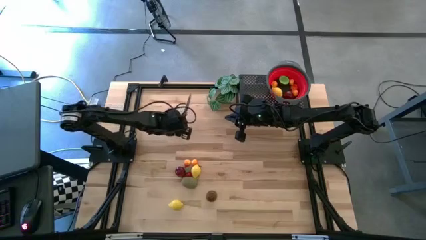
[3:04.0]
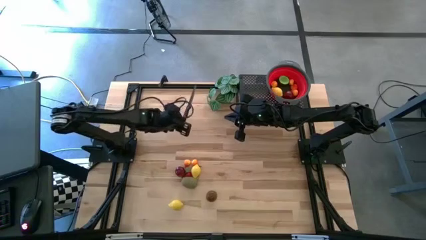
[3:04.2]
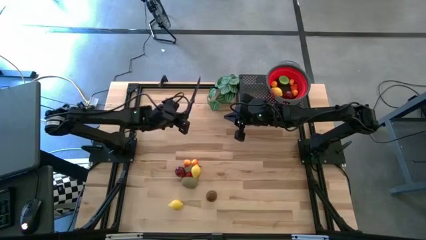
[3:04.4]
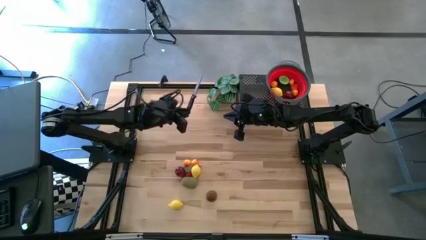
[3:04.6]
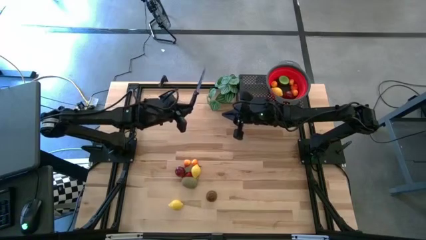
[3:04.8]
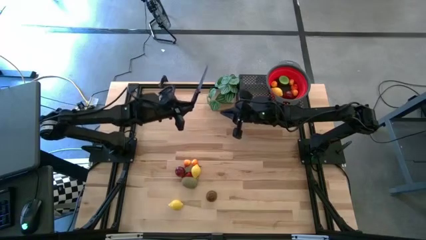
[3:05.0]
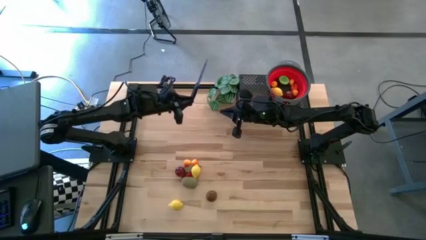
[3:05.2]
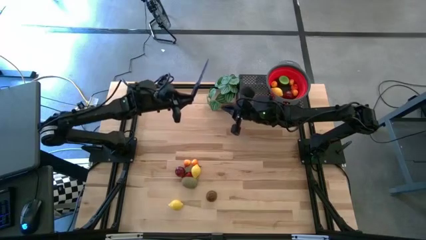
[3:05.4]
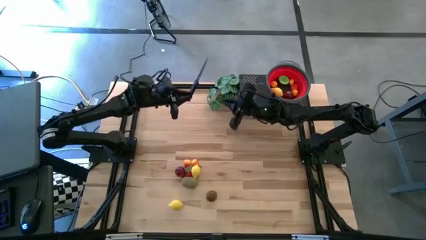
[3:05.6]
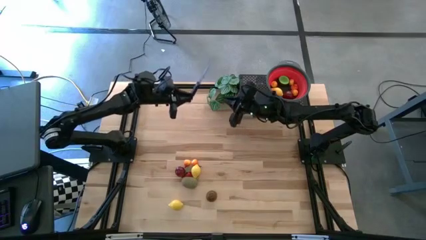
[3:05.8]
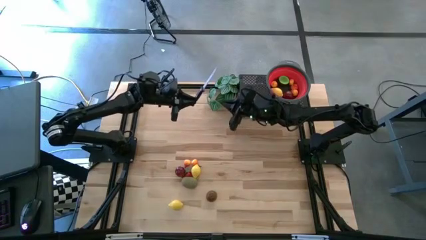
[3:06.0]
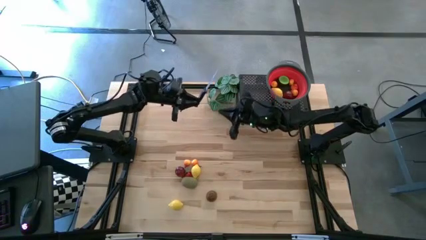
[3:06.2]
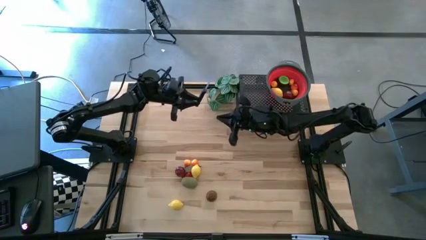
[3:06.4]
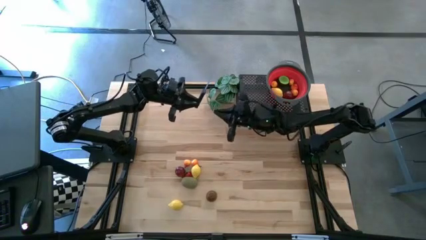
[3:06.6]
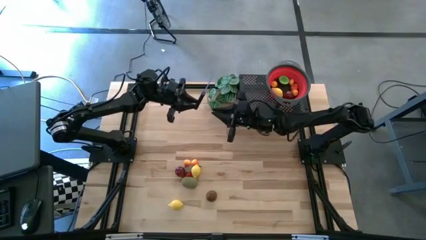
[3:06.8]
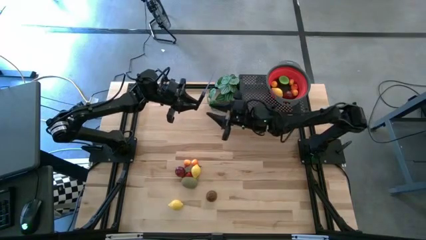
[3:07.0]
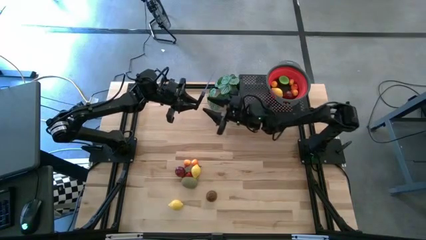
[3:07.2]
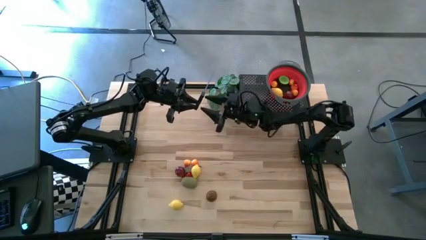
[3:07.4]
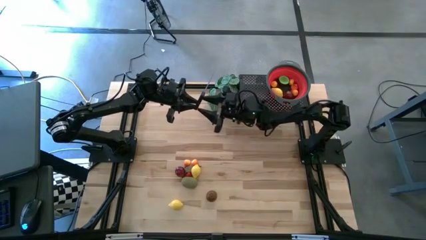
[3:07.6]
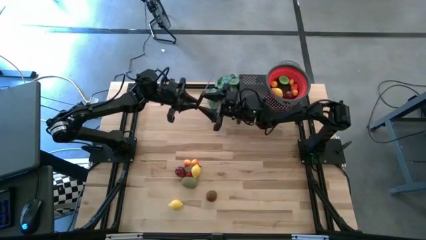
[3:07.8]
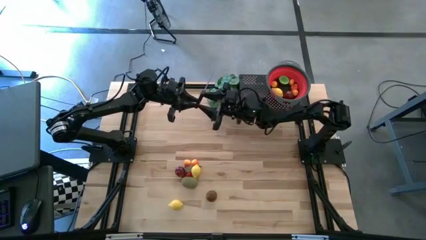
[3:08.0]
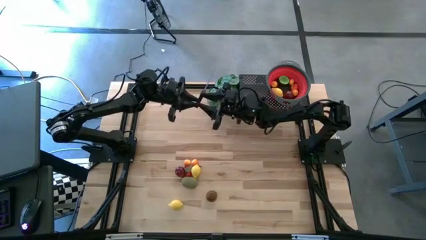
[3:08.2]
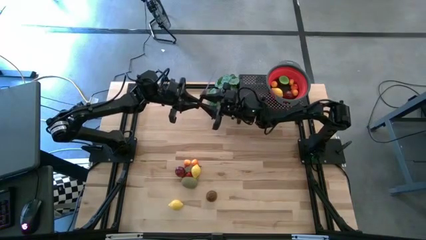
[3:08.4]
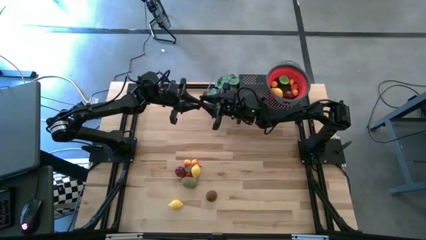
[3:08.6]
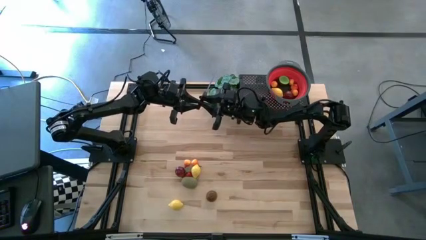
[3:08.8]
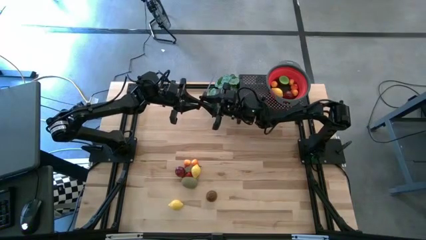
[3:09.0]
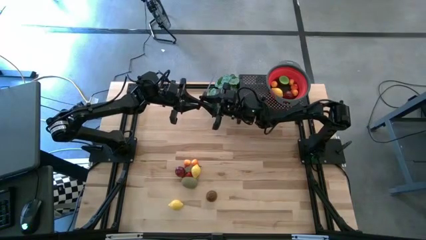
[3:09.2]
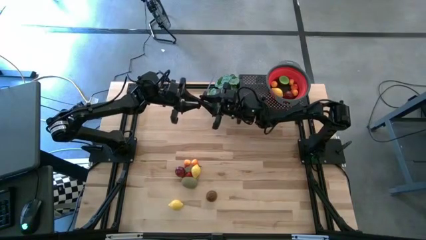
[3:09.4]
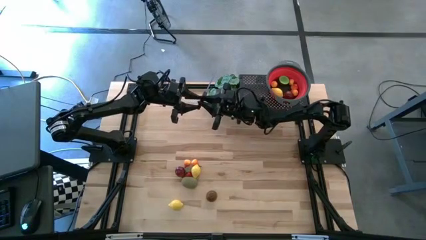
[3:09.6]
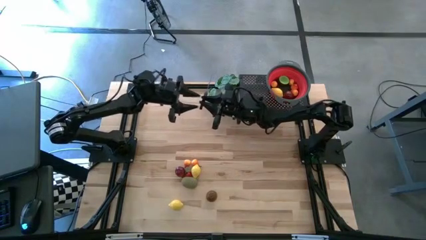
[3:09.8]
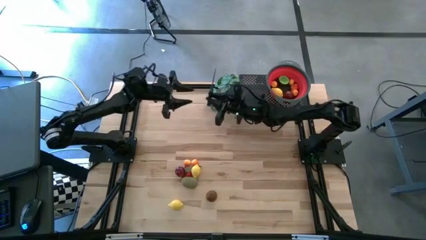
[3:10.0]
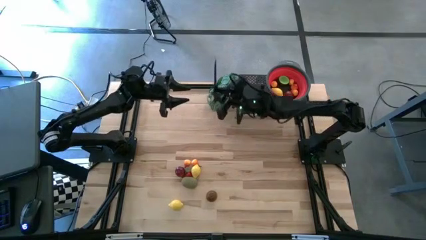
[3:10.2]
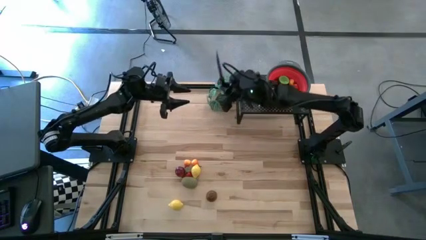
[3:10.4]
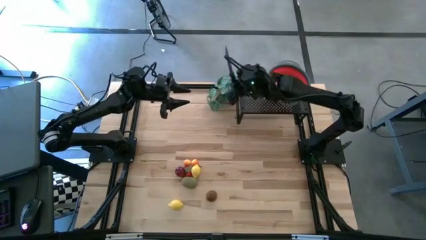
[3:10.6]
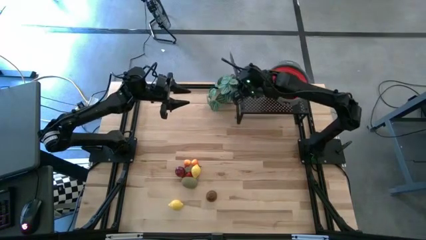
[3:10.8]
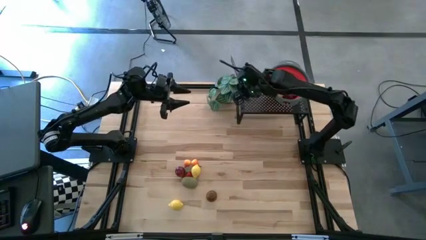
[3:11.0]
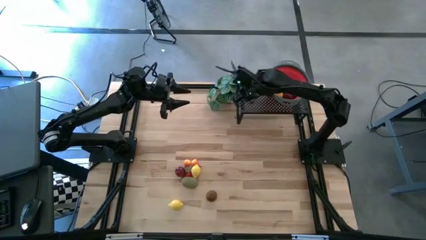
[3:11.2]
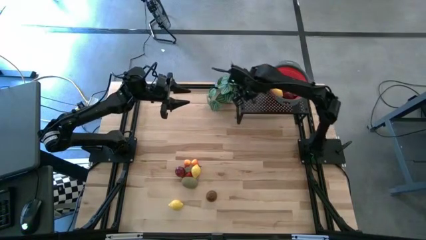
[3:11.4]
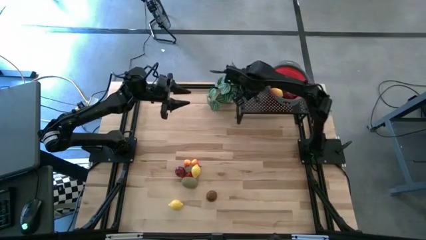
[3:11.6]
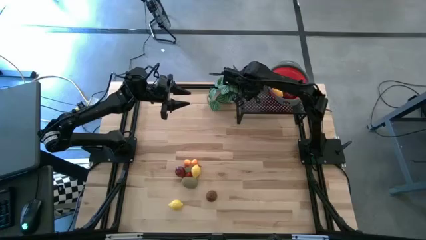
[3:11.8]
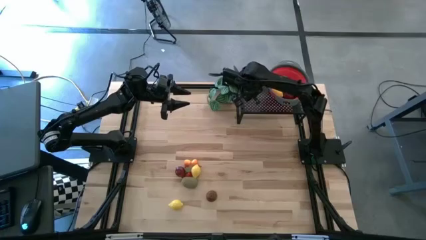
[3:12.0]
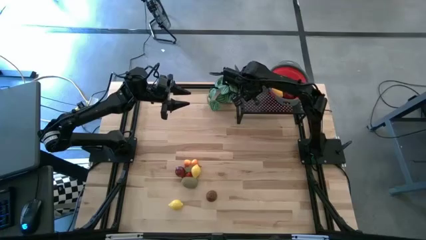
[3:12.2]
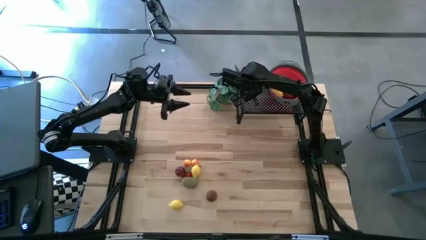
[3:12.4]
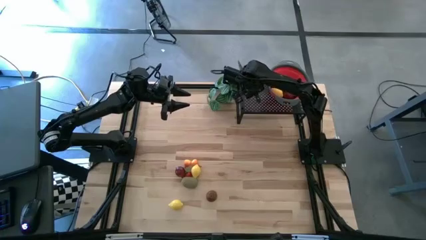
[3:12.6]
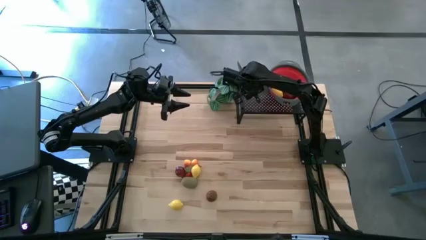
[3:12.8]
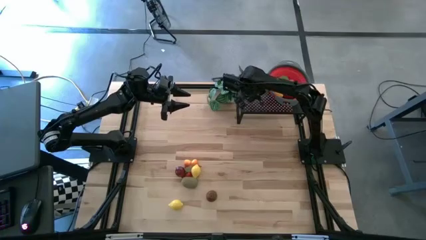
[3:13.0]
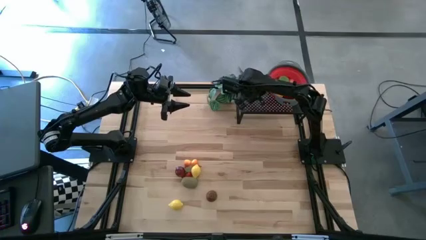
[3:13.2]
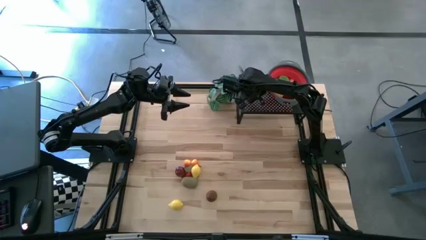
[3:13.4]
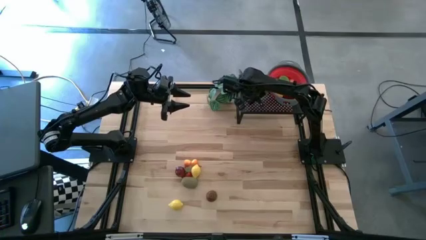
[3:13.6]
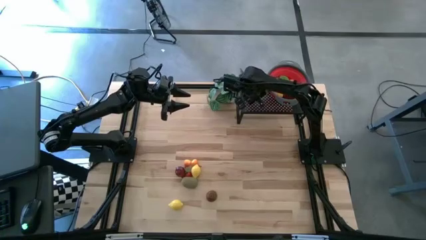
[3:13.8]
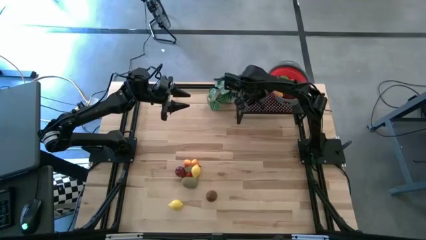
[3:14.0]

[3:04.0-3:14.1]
Task: Pick & Place Fruit
Put the black knife on the shelf

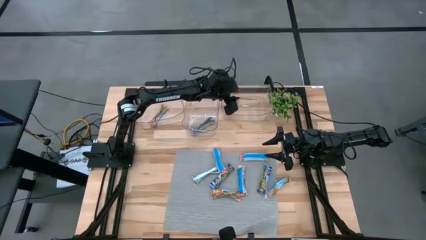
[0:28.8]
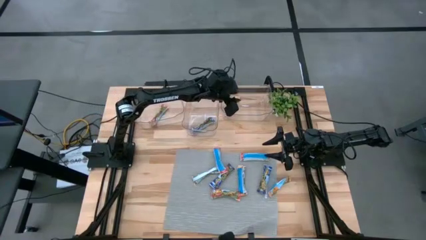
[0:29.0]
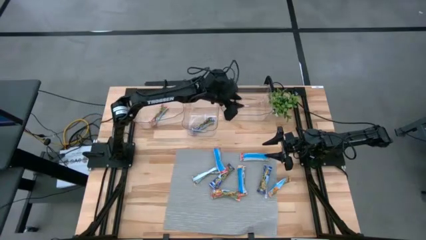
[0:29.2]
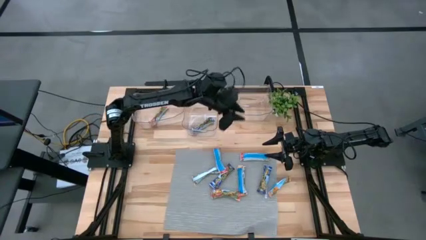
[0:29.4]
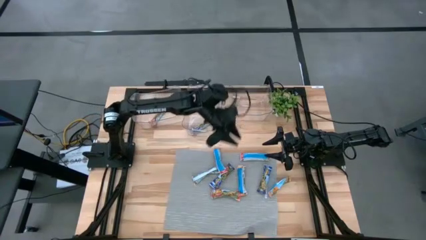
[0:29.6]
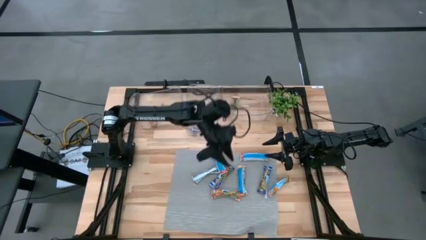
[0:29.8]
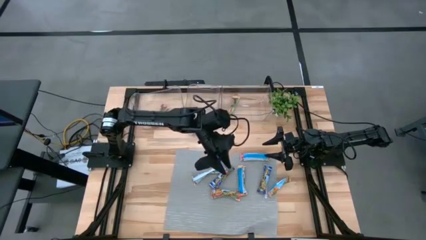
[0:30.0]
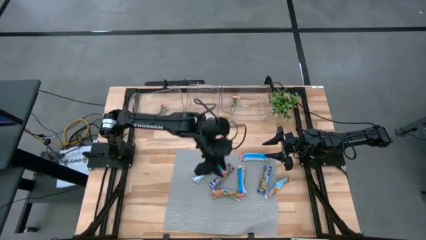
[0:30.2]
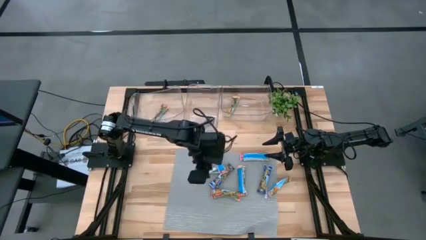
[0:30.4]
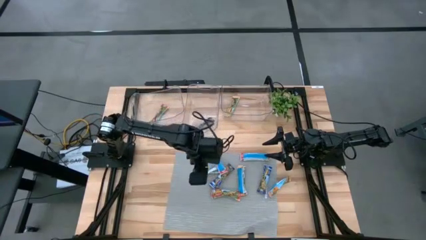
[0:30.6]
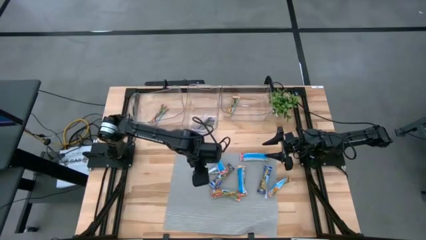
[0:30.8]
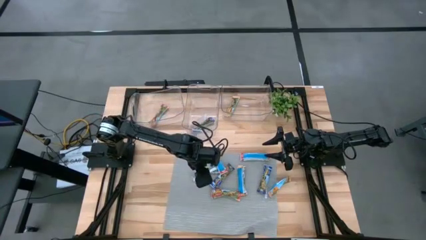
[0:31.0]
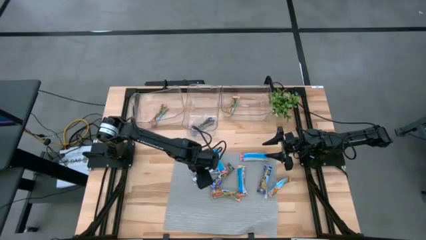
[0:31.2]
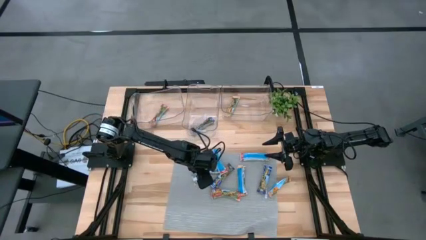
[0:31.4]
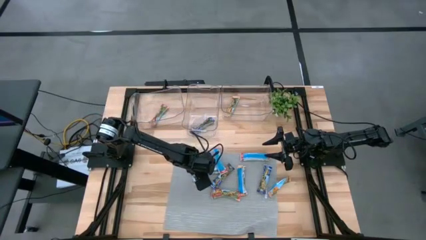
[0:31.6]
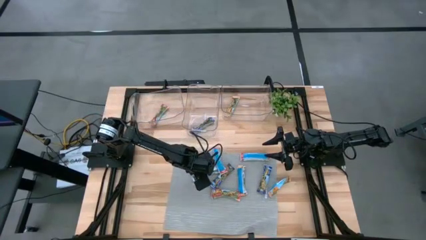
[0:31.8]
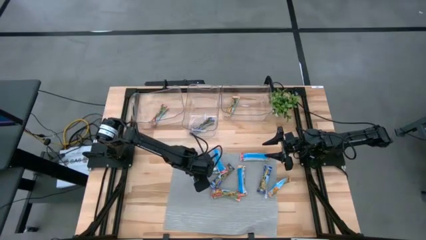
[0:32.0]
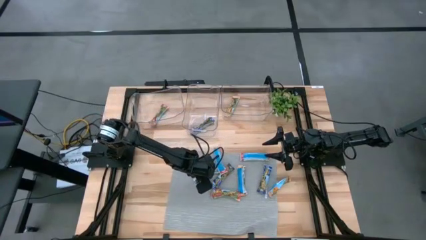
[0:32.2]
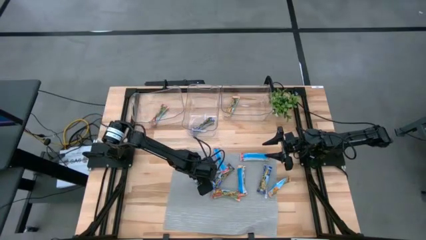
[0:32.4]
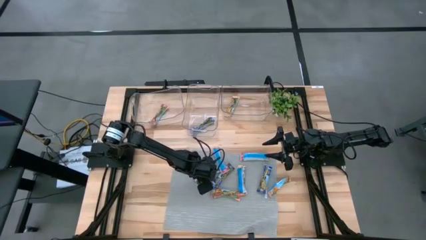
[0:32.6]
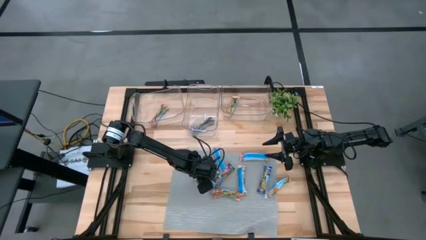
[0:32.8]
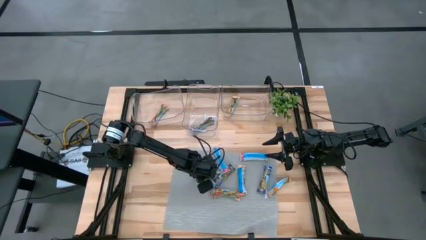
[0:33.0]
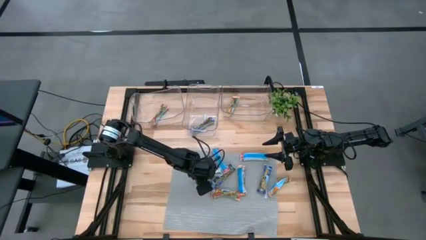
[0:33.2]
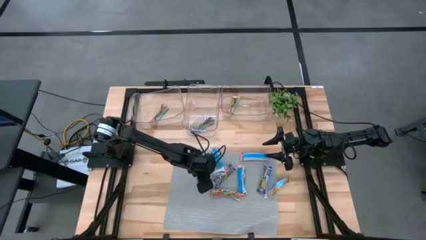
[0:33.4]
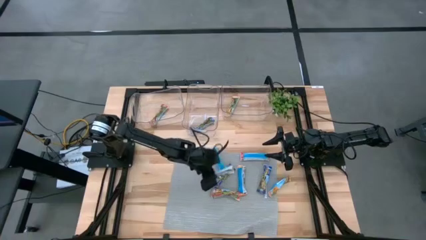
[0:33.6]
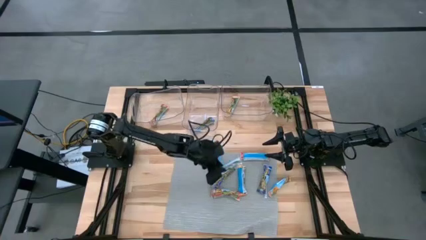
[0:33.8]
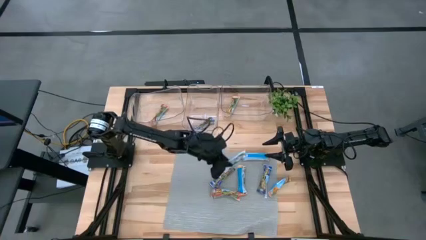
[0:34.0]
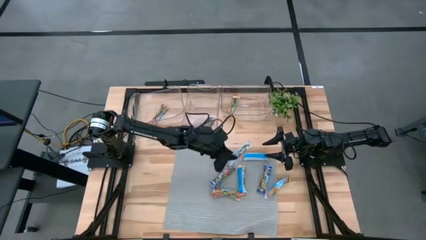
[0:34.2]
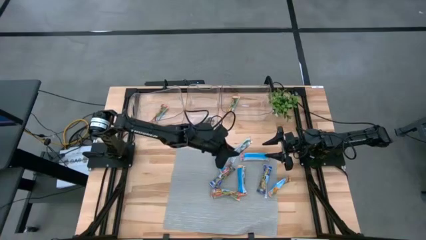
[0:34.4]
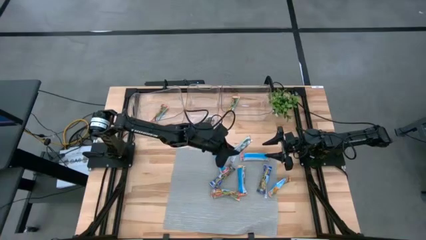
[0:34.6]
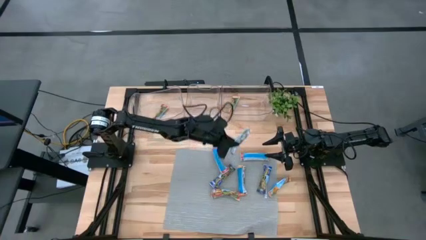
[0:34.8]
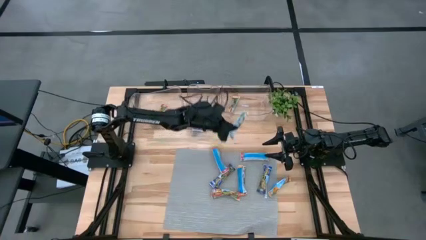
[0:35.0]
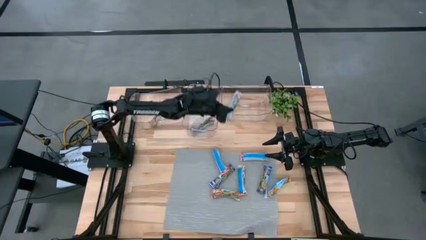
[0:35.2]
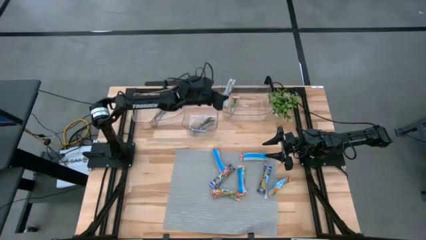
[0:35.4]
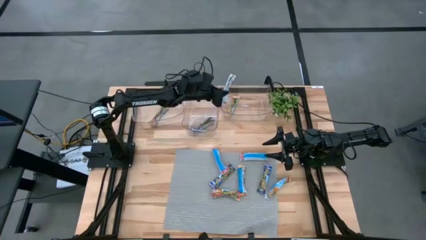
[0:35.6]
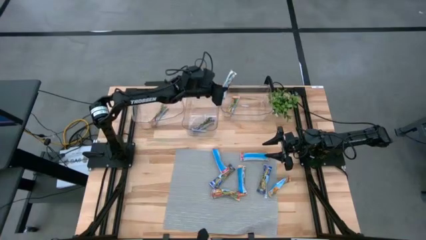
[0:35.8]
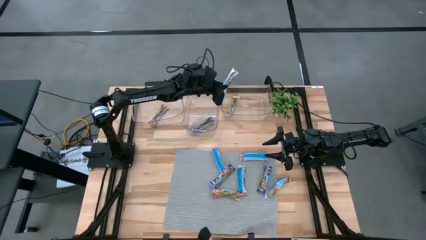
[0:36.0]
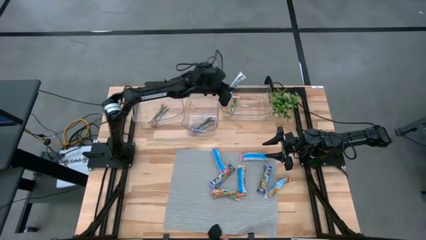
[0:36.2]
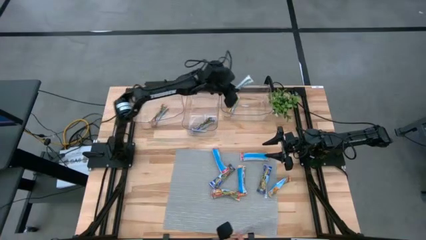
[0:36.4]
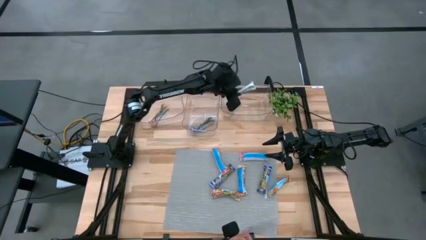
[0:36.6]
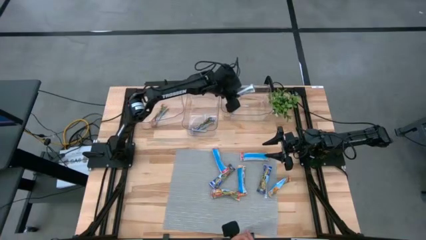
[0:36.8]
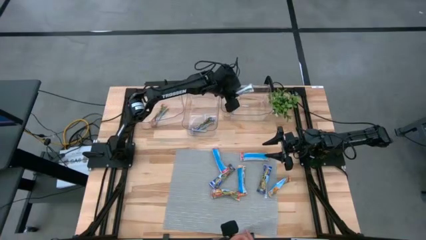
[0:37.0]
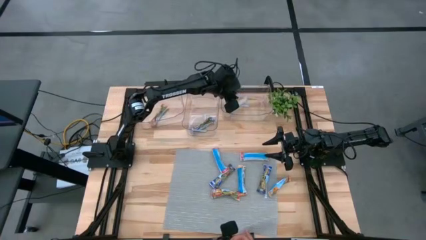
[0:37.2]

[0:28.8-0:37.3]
Task: Pick and place Granola Bars by type
Put the left yellow granola bar into the right transparent bin
